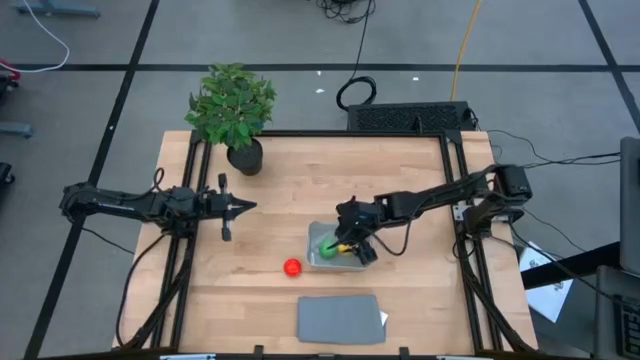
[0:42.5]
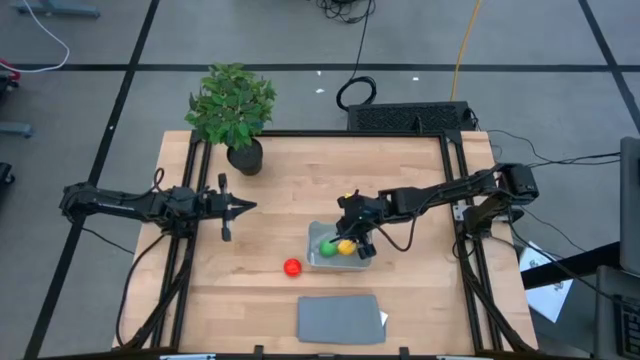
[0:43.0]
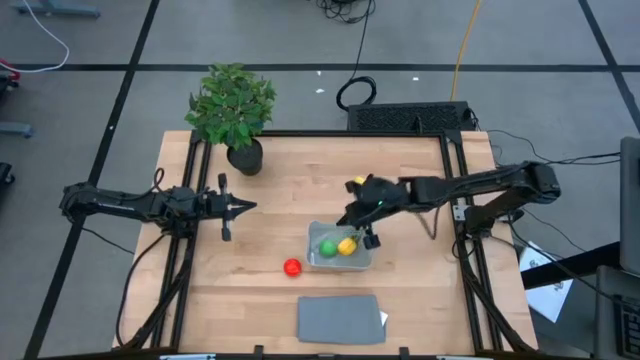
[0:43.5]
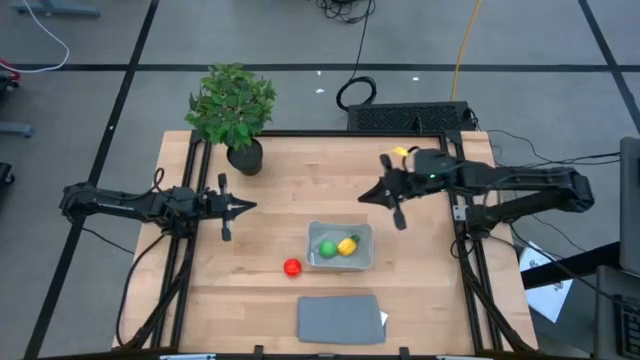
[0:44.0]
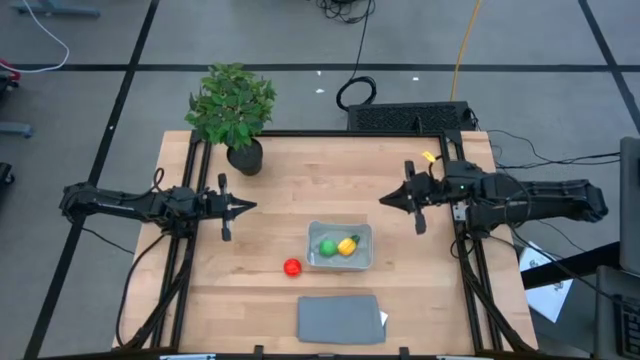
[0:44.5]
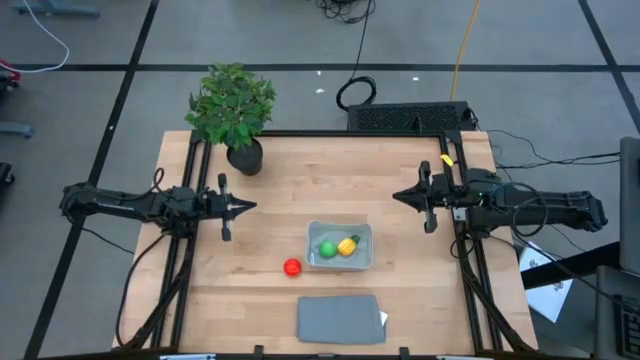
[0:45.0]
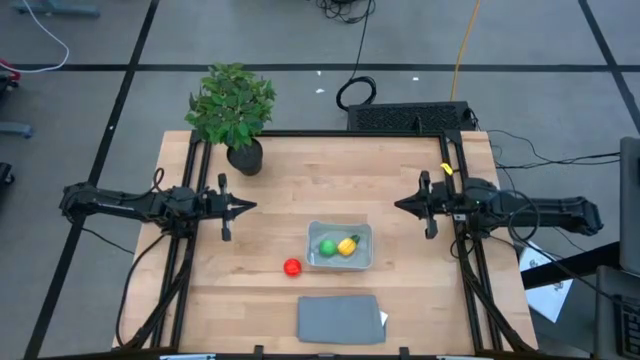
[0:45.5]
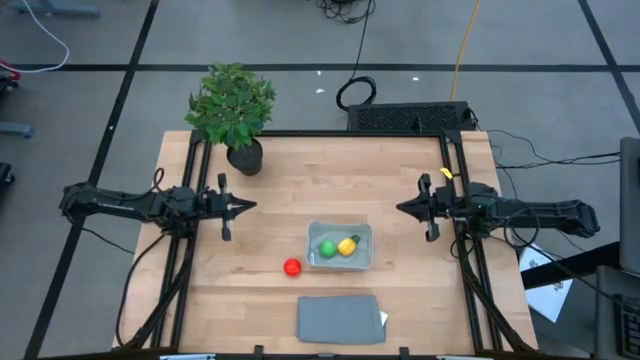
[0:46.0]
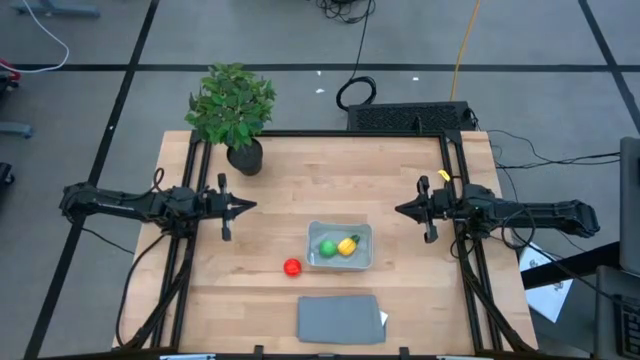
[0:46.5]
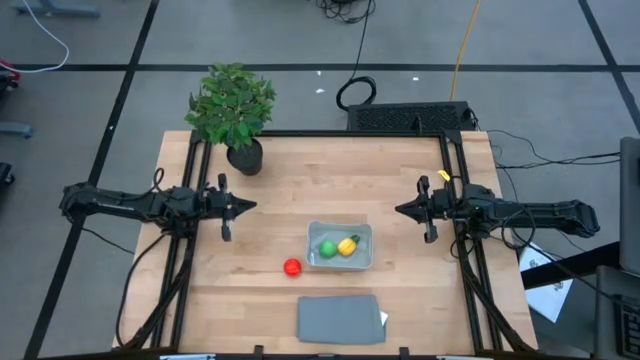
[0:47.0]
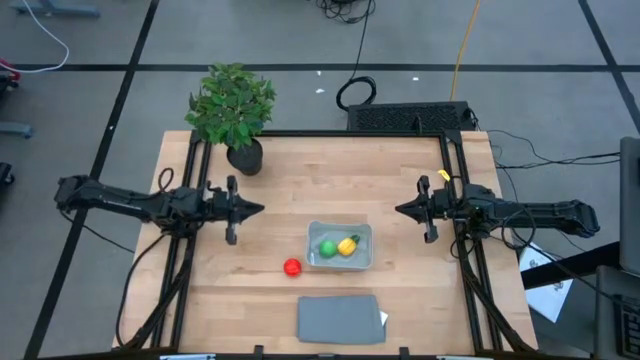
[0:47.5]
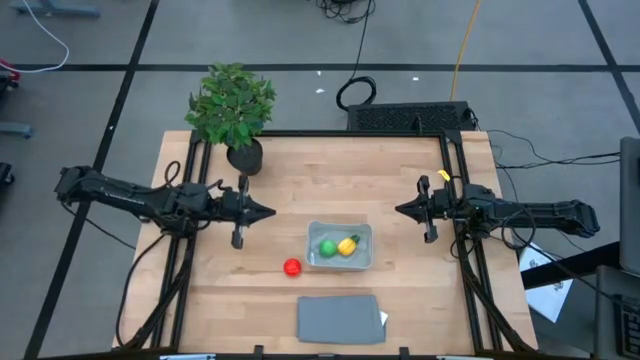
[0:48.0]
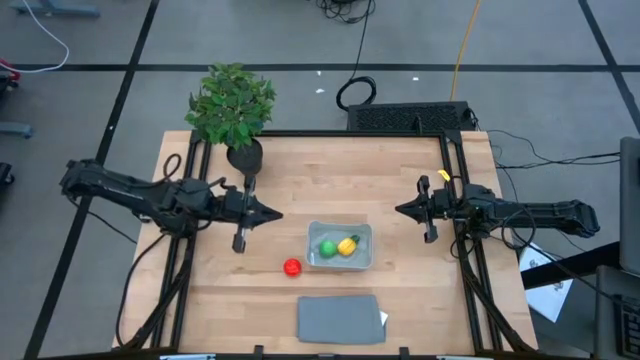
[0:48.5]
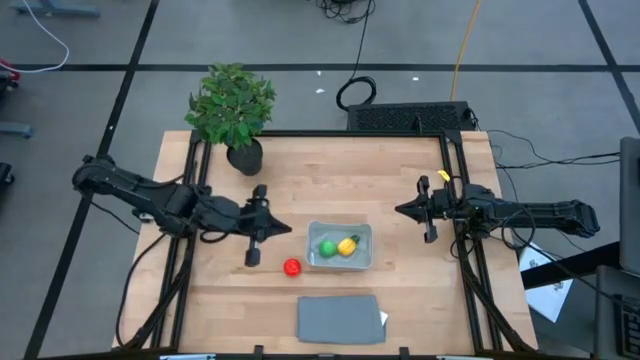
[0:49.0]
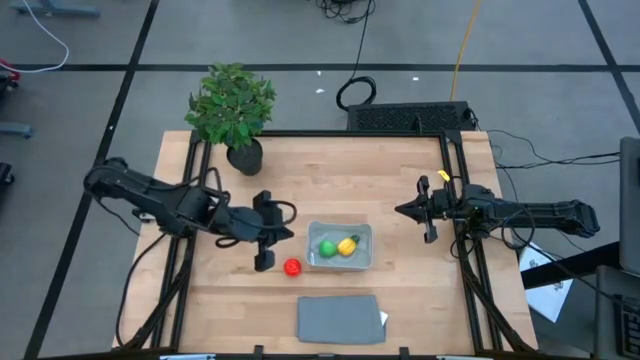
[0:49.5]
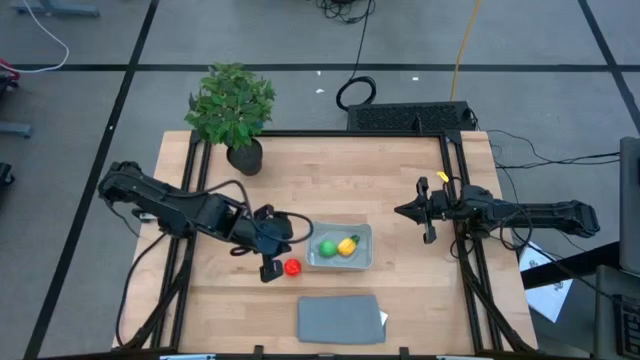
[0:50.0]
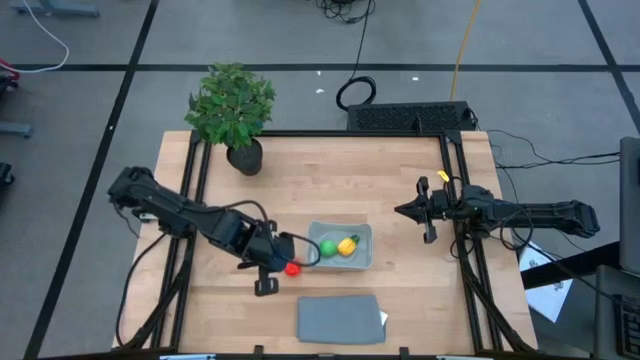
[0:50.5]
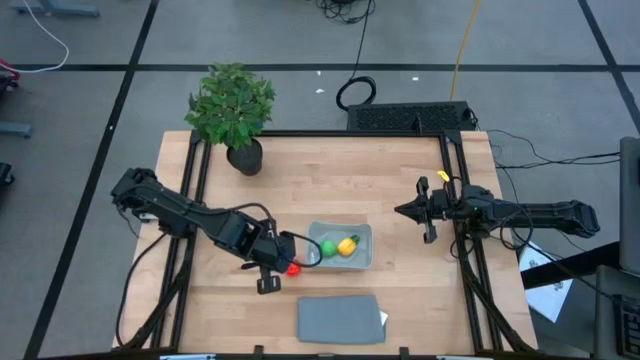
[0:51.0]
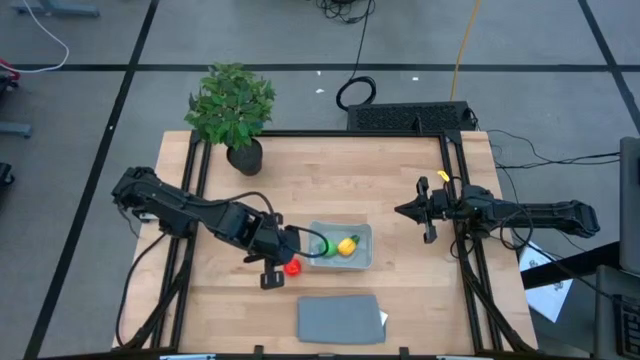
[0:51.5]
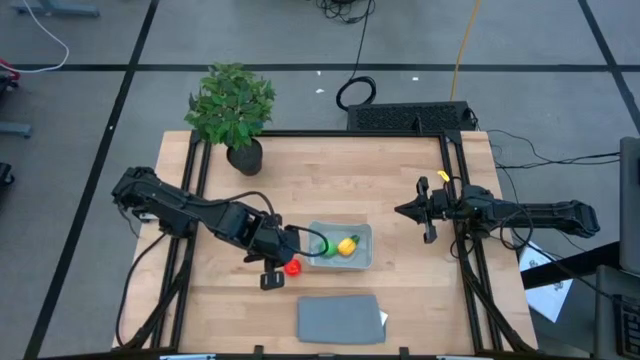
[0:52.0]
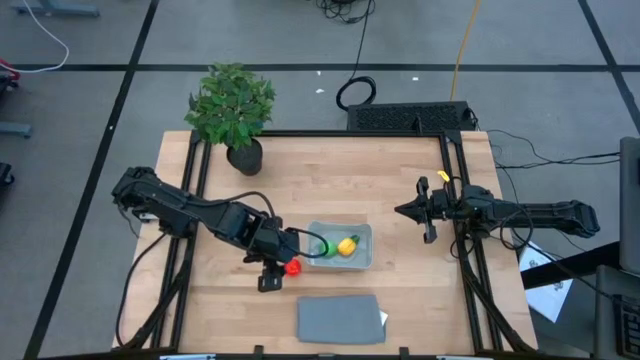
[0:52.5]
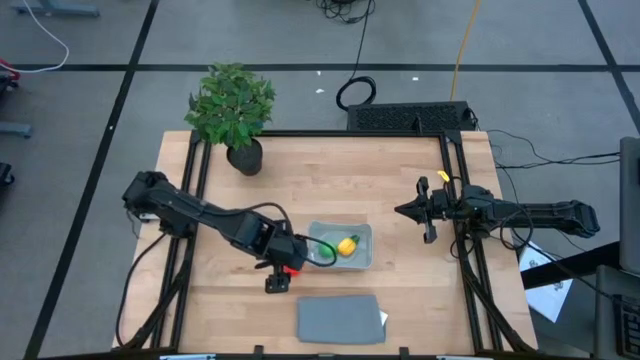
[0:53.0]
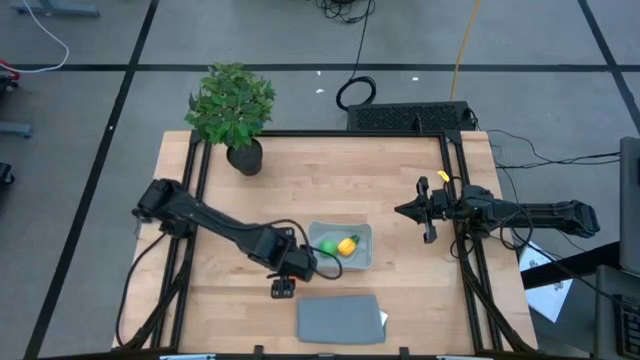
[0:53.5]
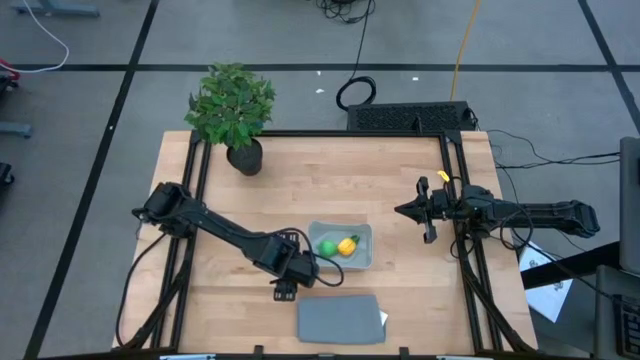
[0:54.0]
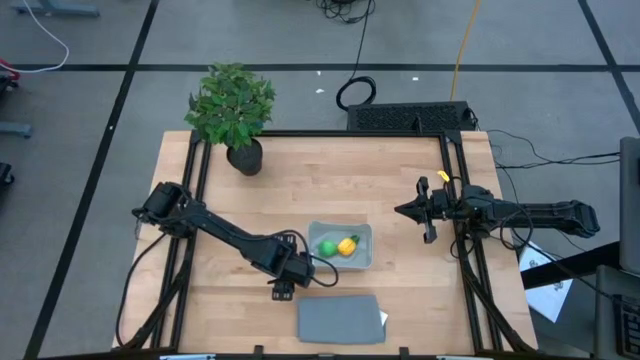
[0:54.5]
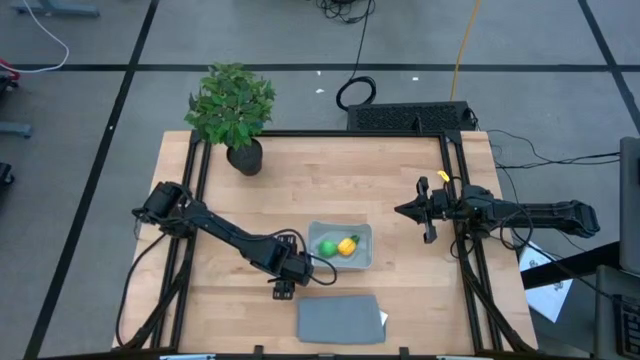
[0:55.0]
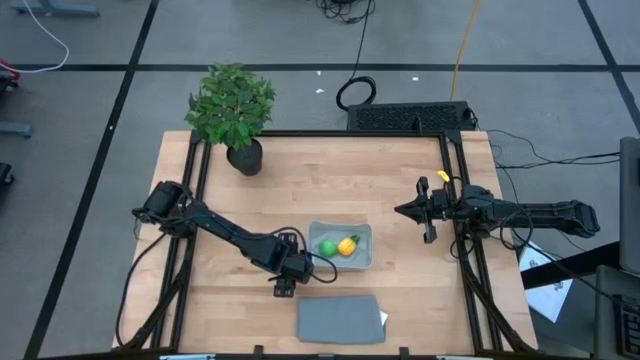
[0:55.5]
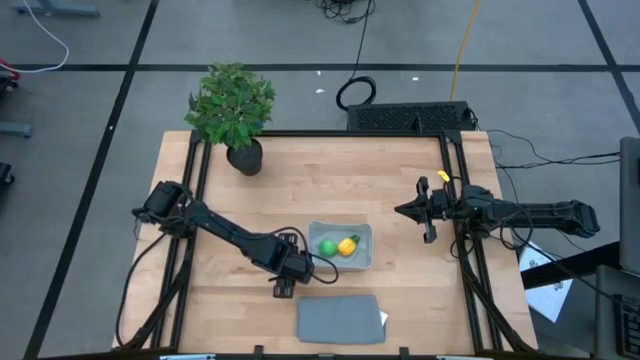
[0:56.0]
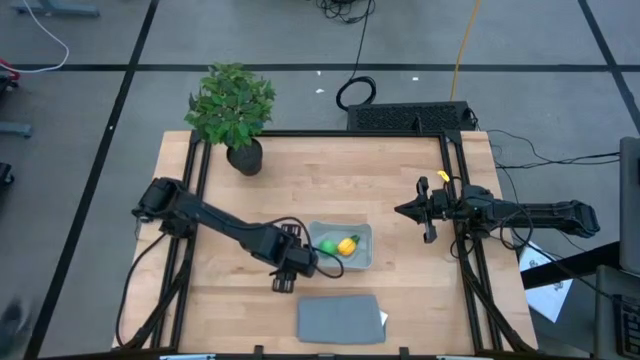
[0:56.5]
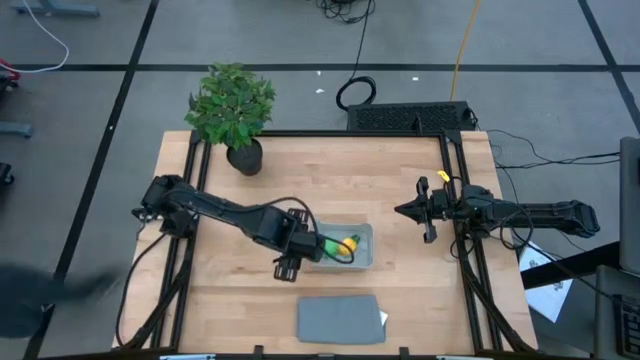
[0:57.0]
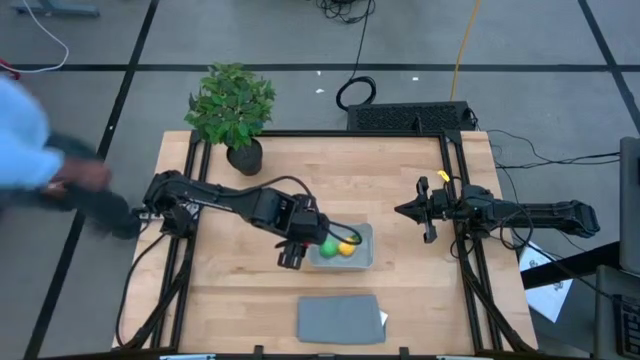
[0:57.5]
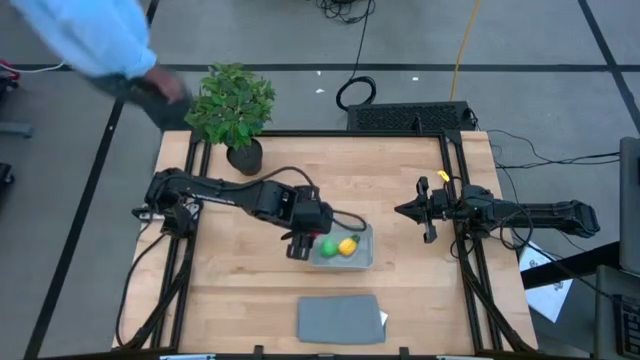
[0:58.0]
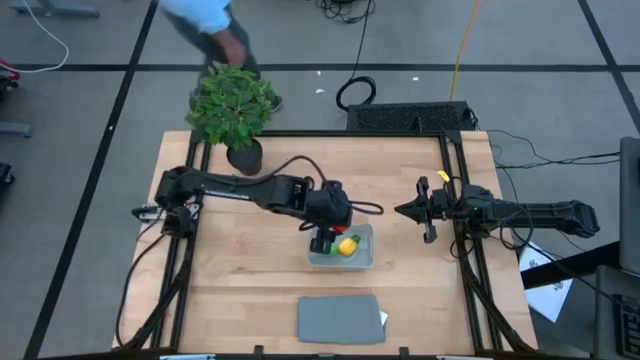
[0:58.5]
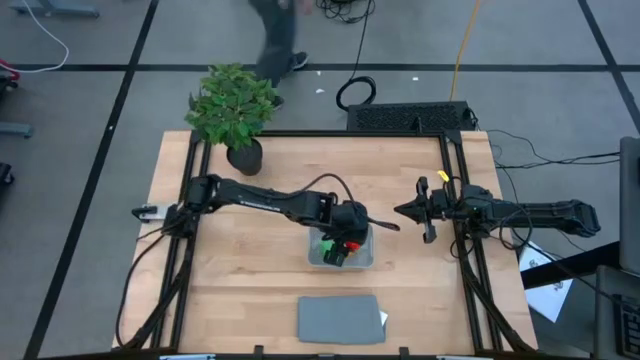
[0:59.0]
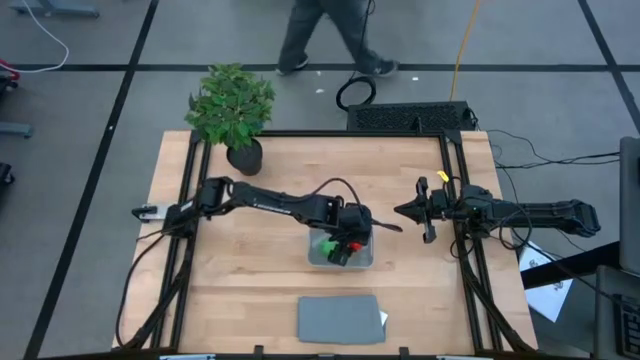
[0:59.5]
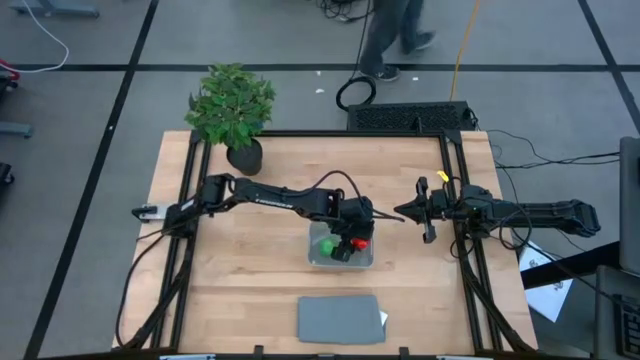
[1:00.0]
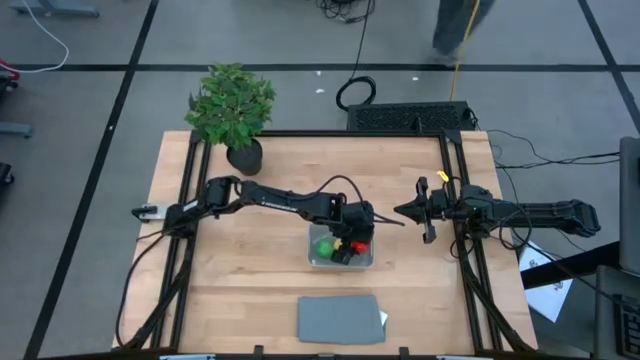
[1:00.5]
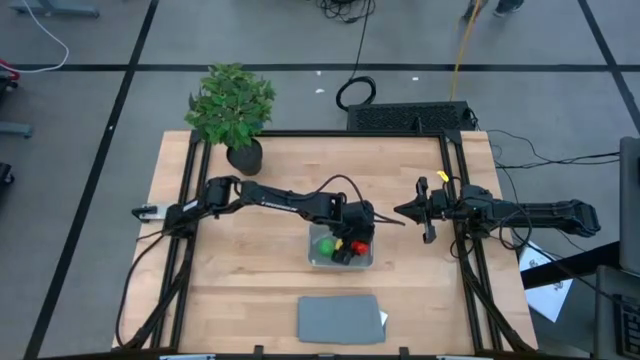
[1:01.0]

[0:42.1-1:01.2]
Task: Pick and placing Produce into tupperware
Put the red tomato into the gray bin

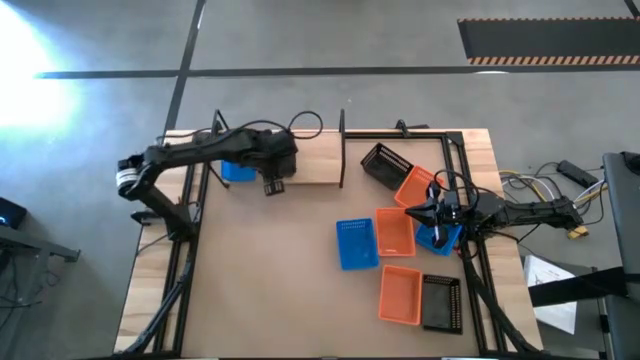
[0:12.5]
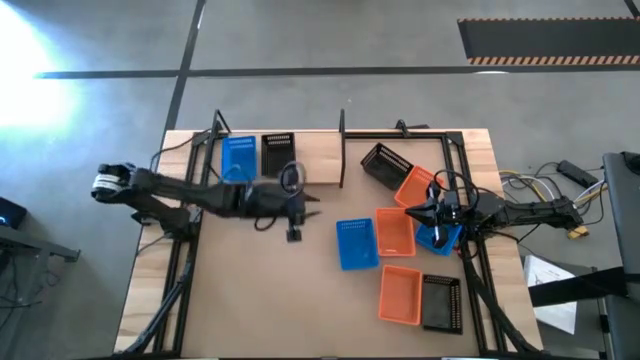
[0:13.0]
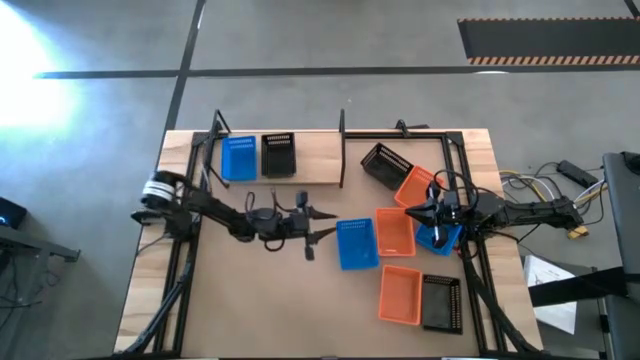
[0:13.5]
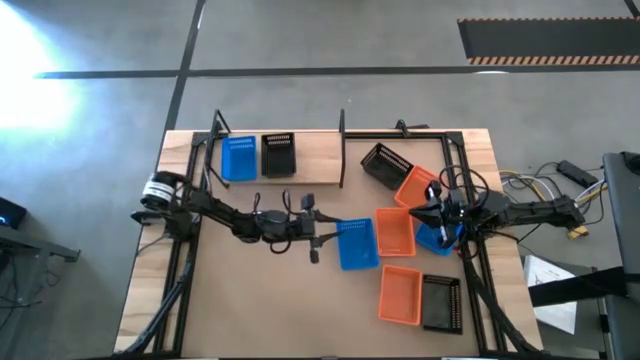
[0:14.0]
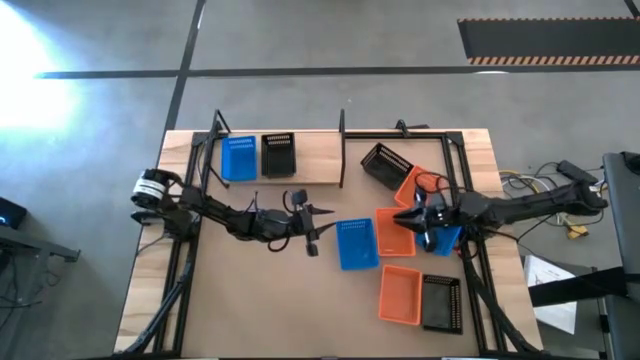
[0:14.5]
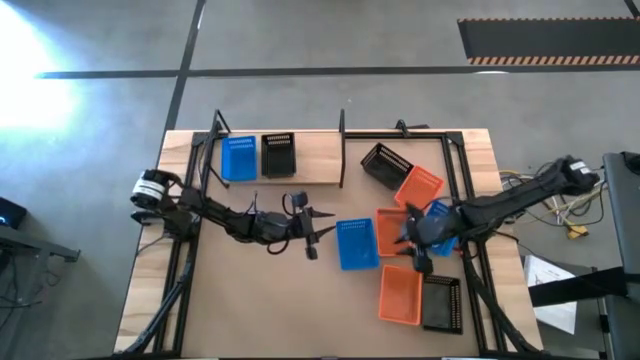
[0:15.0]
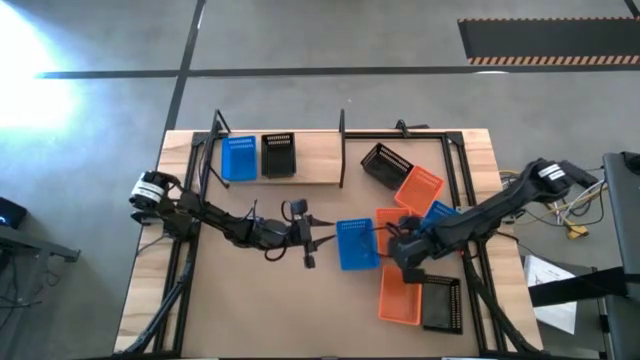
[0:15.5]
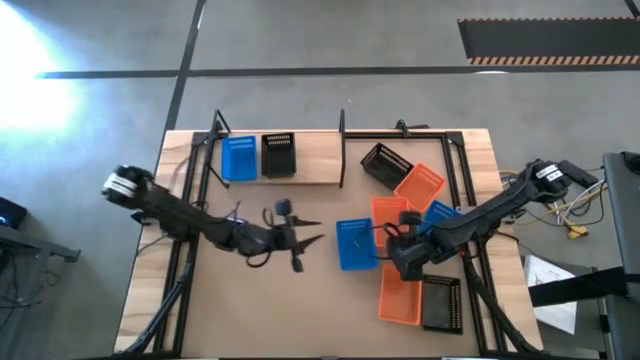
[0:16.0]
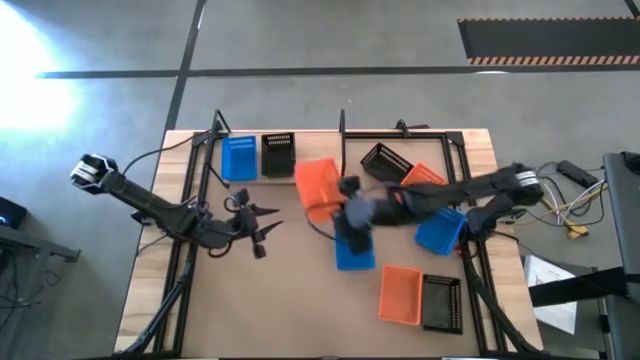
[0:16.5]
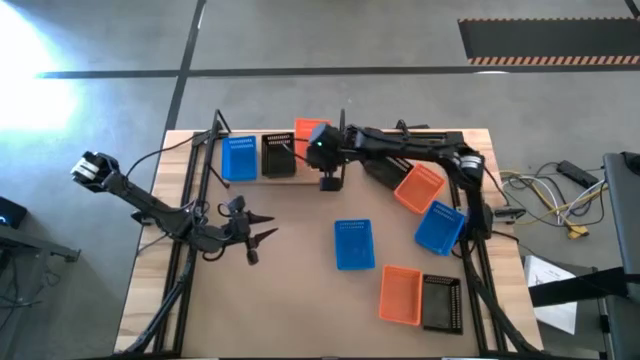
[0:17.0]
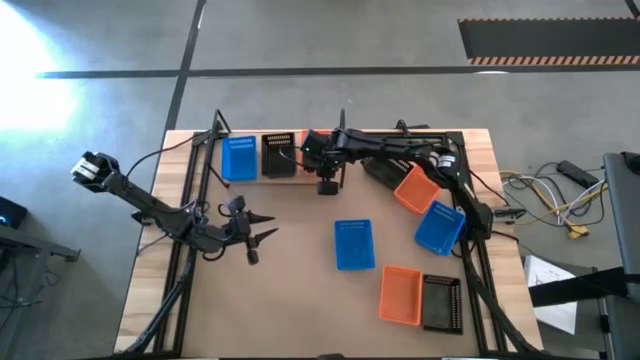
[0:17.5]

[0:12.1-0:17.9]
Task: Stack baskets on shelf by color
Put the middle orange basket on the shelf
